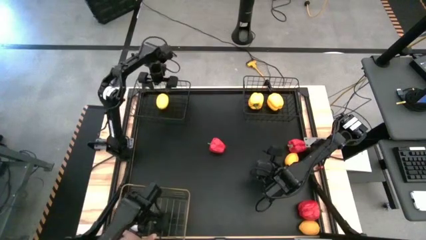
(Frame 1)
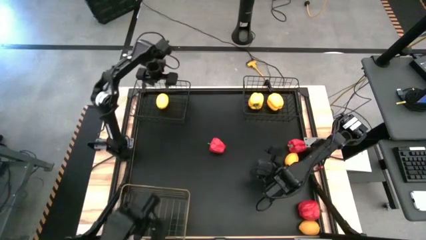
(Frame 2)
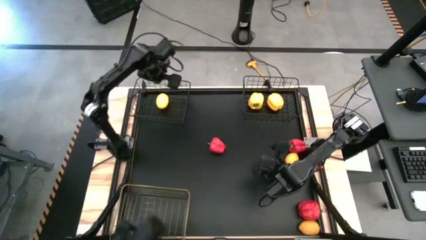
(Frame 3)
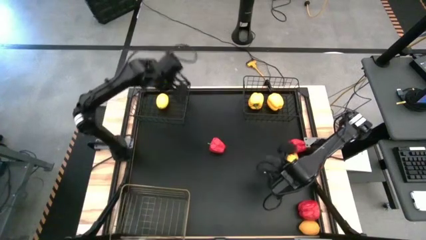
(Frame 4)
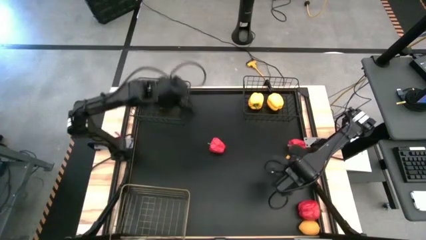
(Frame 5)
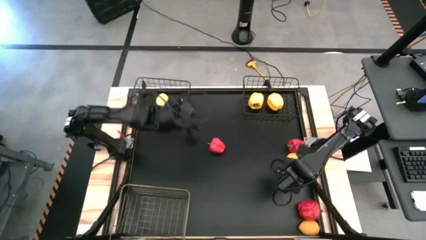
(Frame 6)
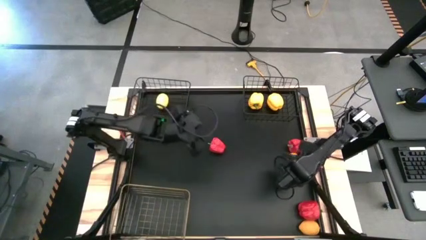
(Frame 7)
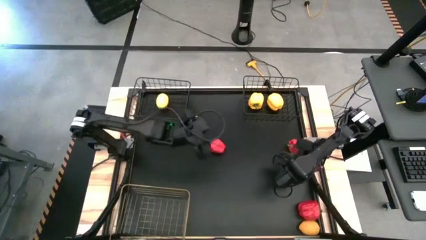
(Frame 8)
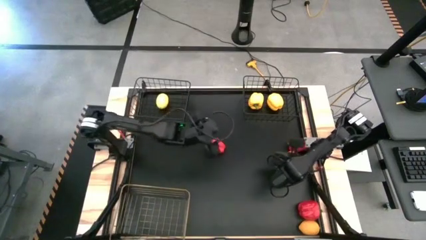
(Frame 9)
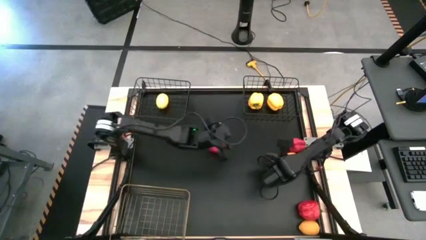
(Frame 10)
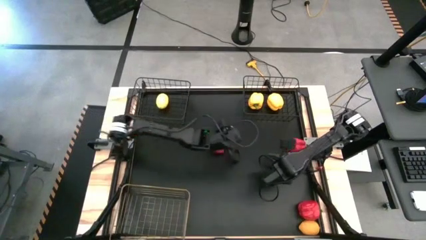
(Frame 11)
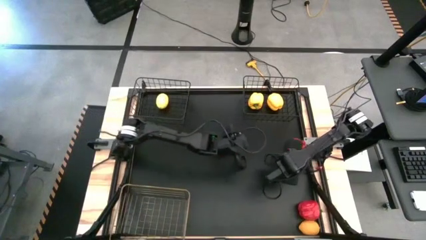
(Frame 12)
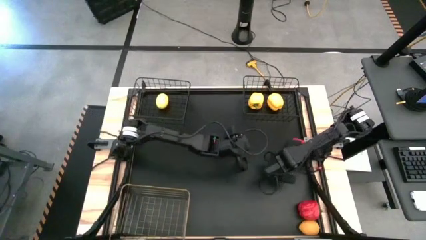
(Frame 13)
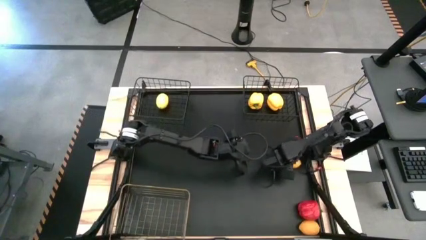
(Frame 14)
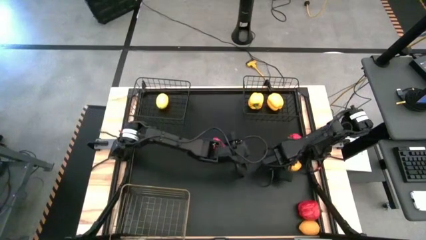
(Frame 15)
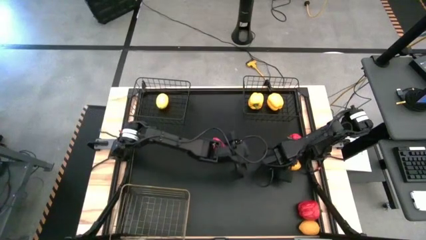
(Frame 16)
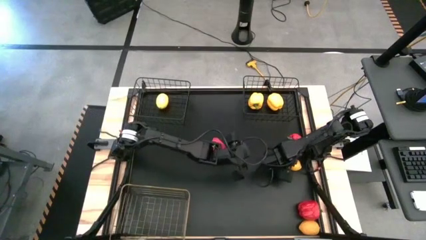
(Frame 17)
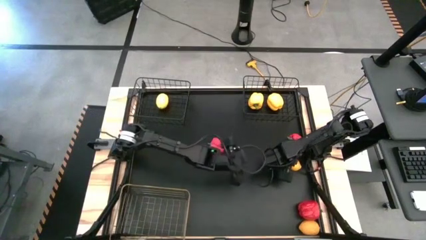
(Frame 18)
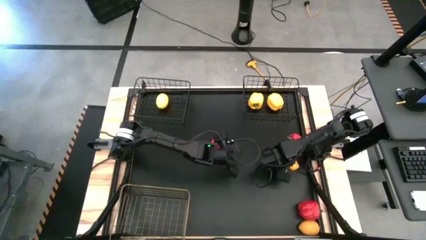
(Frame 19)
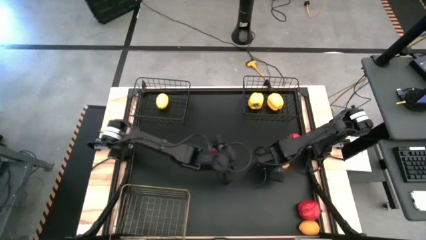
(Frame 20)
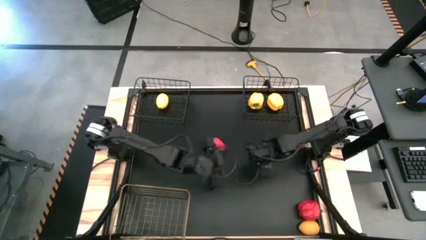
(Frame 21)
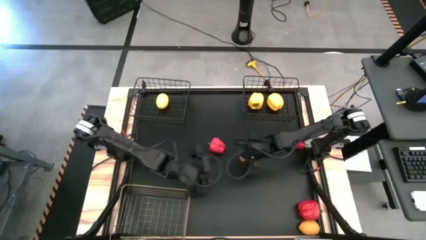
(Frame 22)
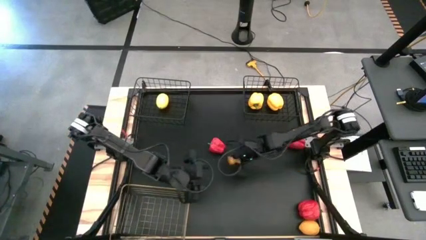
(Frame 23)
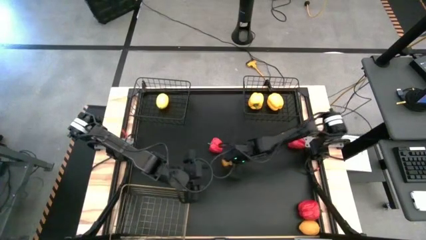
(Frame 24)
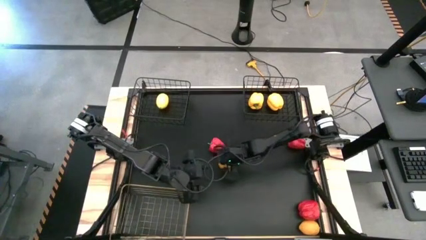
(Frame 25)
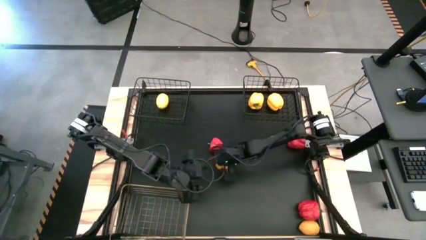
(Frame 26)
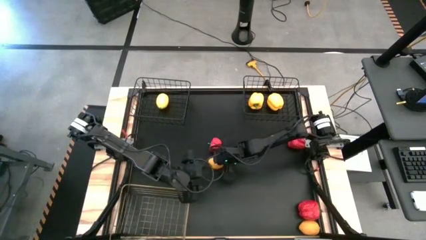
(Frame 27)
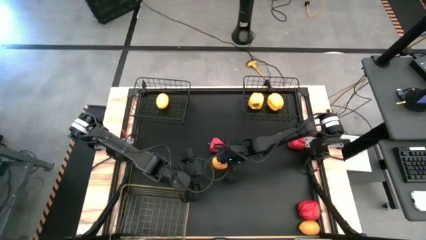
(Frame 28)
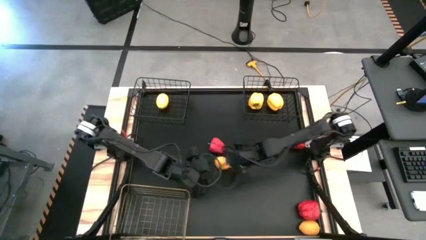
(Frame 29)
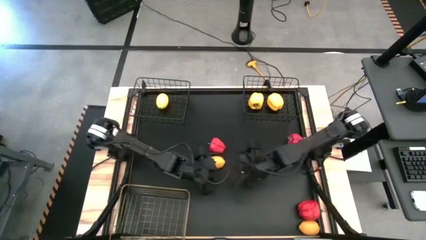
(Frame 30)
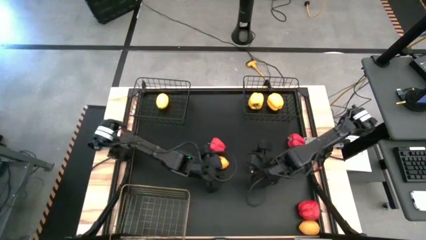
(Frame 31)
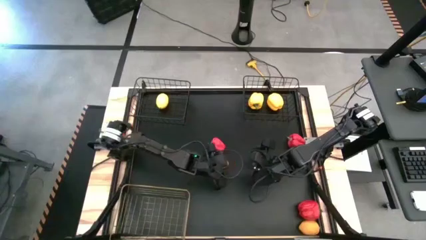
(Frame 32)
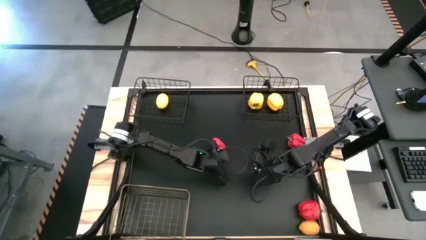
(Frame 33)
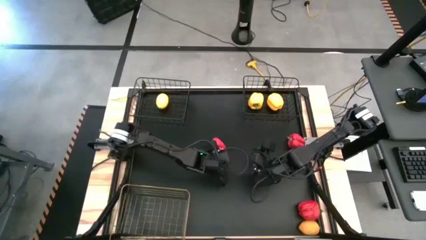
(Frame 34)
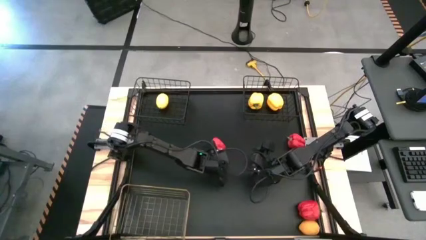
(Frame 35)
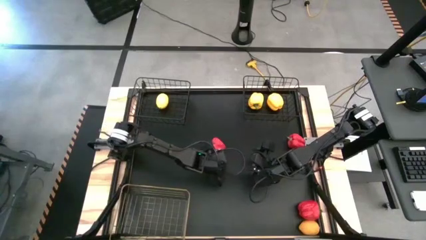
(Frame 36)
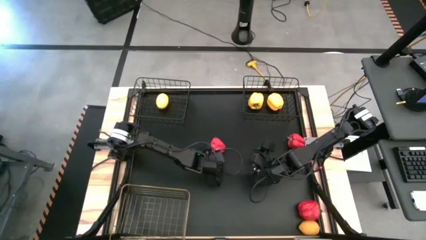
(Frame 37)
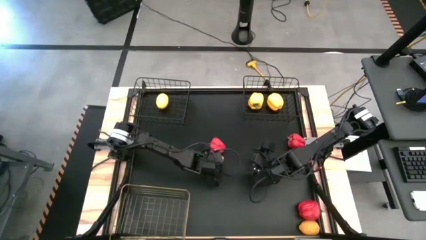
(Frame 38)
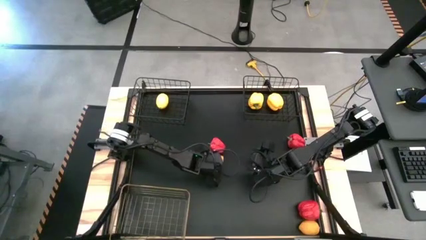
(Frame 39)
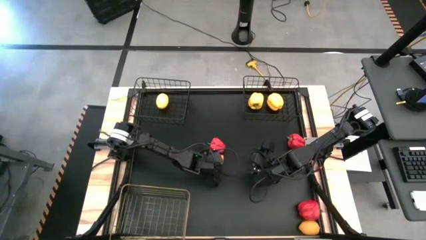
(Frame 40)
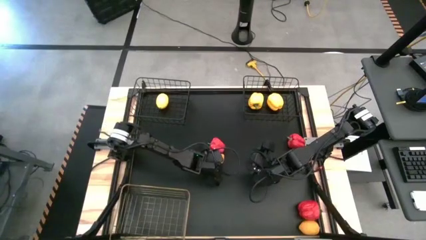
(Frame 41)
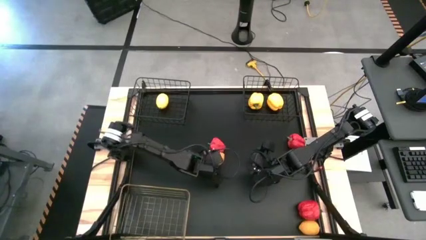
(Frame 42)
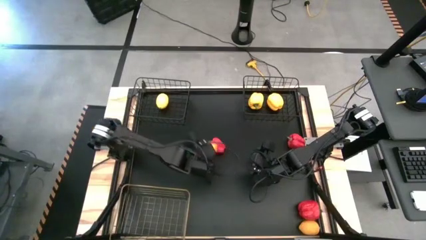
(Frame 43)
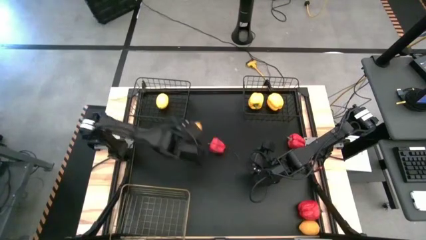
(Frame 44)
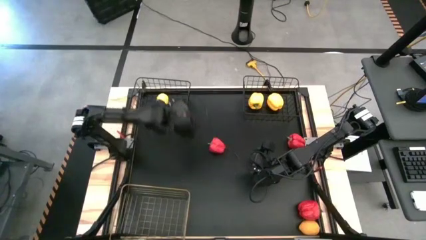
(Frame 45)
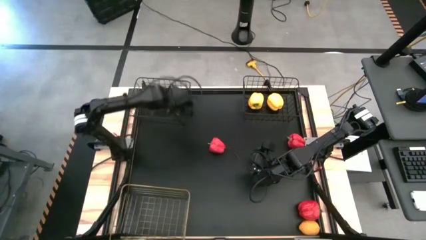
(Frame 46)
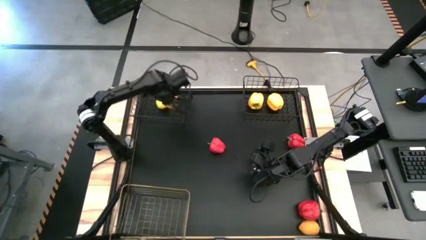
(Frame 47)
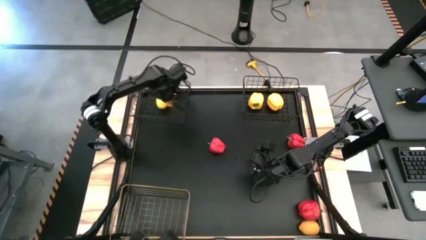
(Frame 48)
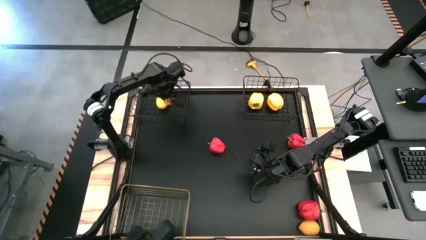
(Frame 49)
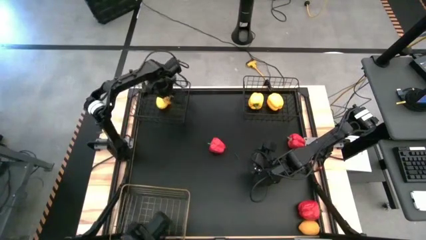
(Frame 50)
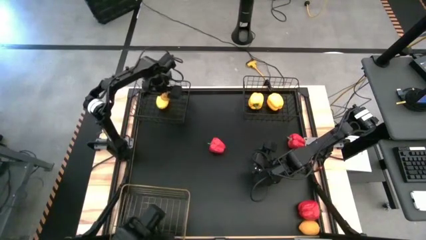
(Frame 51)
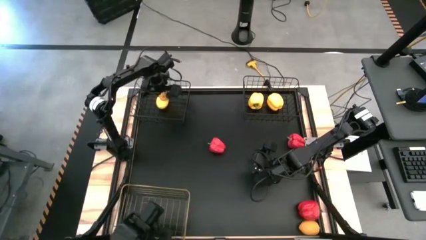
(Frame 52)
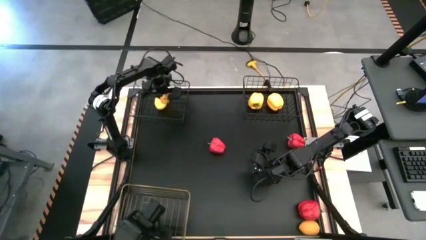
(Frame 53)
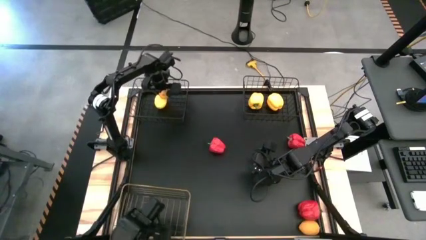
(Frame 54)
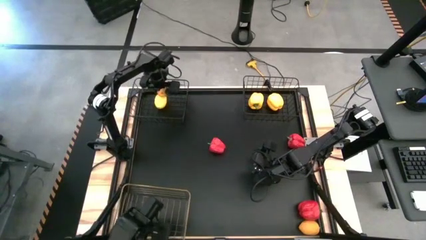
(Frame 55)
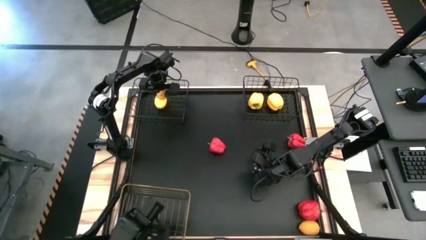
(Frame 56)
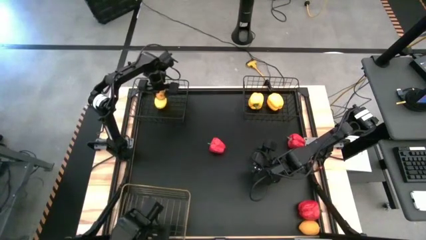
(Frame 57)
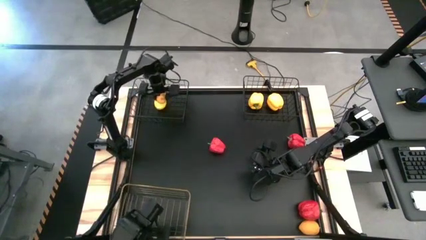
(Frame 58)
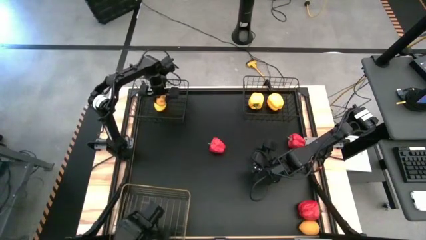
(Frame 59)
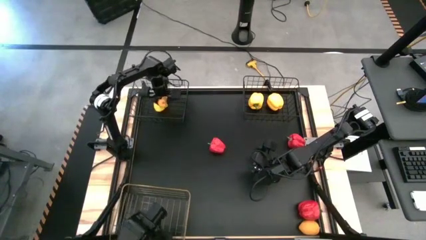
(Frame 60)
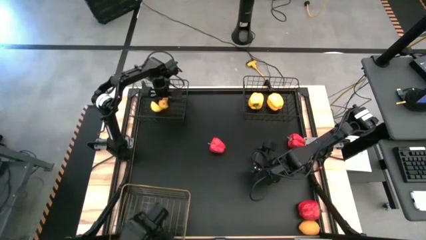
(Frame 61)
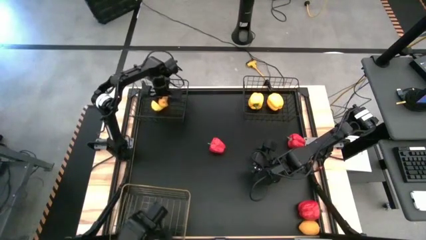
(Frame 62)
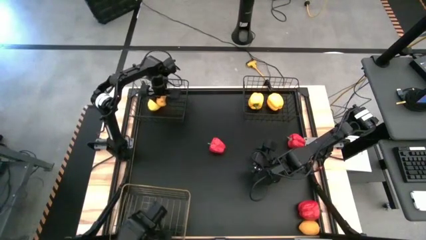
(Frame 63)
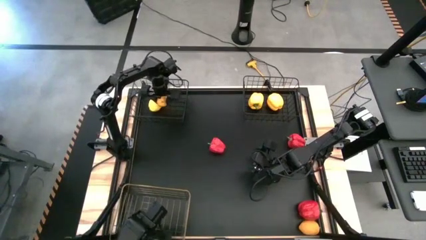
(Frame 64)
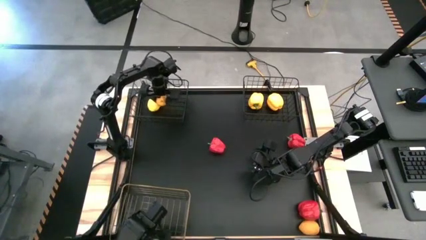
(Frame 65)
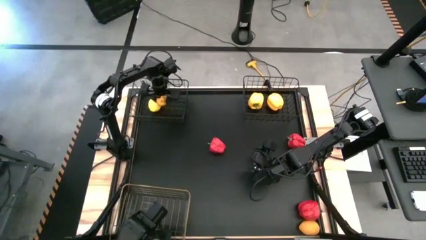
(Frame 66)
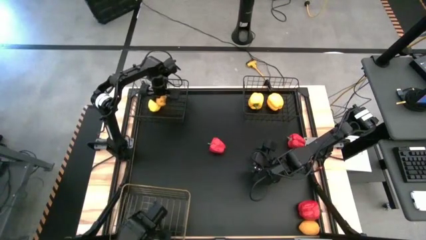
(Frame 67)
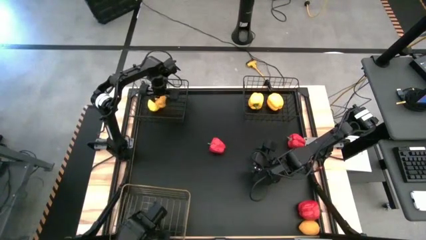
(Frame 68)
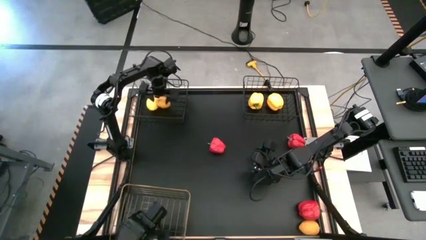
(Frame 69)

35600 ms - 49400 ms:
Task: Sort produce into baskets
Put the top lemon into the left black wire basket
